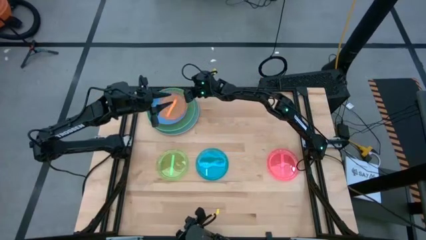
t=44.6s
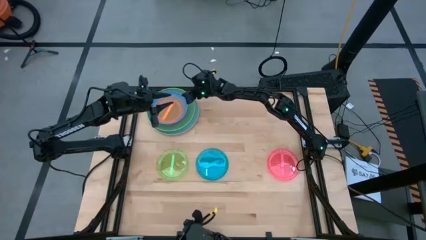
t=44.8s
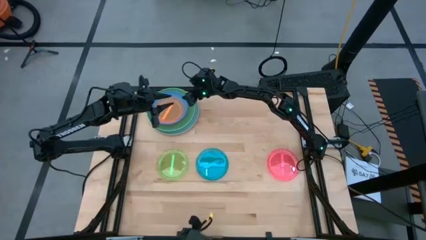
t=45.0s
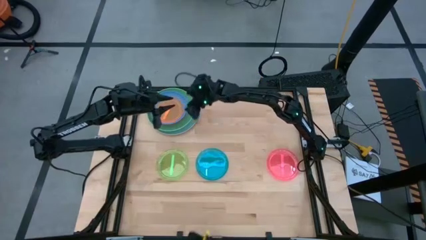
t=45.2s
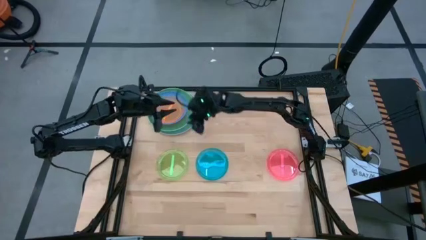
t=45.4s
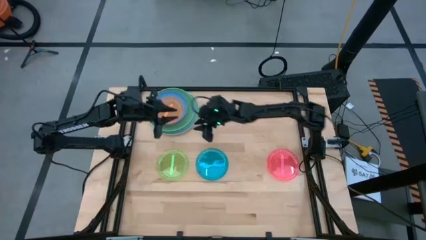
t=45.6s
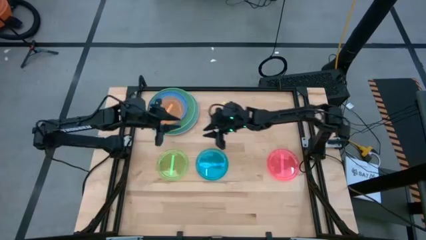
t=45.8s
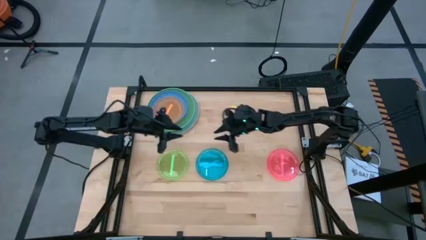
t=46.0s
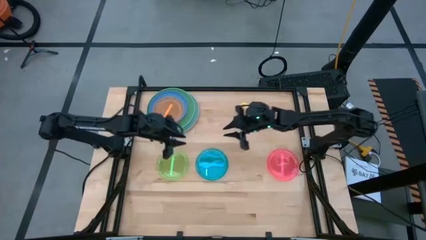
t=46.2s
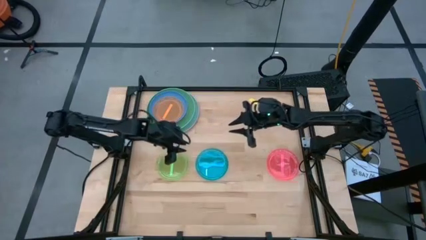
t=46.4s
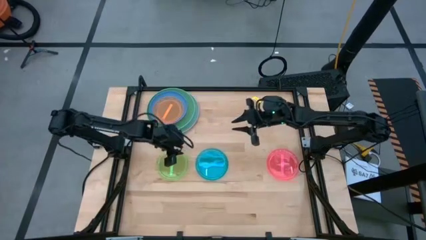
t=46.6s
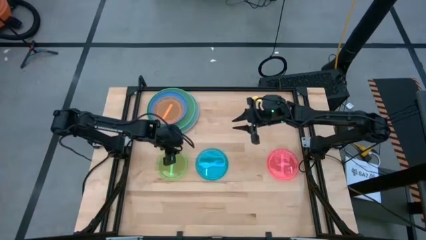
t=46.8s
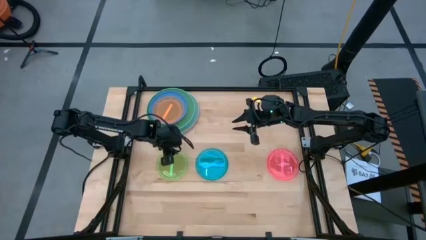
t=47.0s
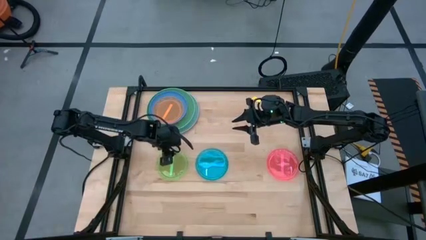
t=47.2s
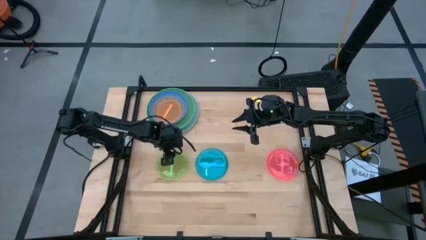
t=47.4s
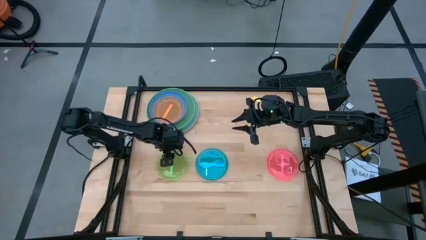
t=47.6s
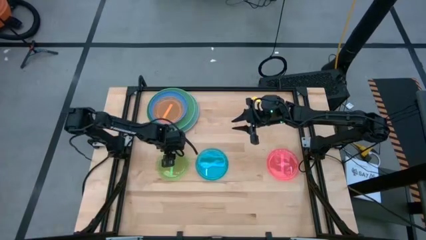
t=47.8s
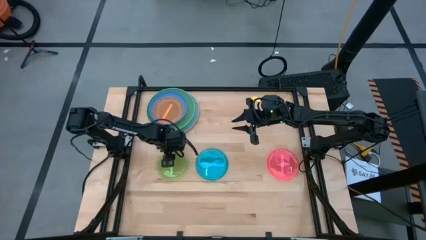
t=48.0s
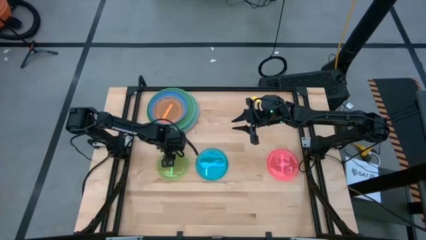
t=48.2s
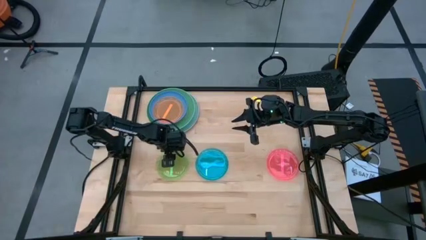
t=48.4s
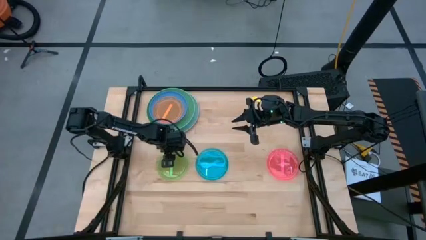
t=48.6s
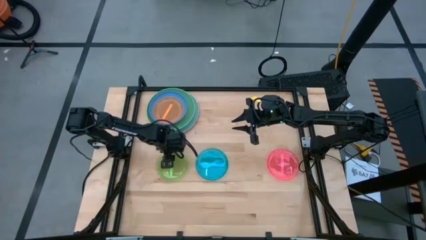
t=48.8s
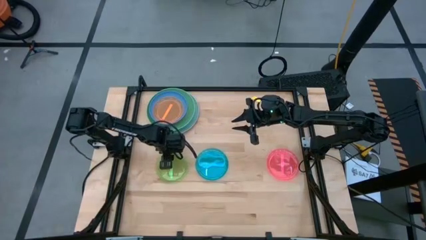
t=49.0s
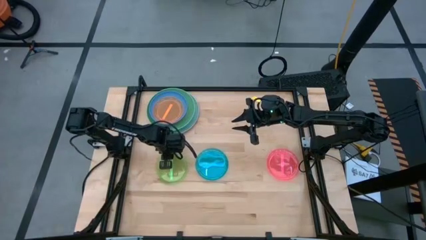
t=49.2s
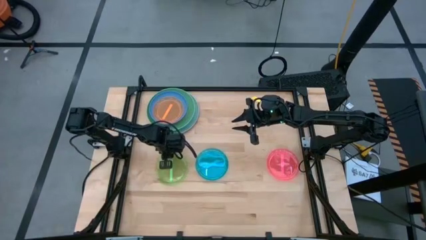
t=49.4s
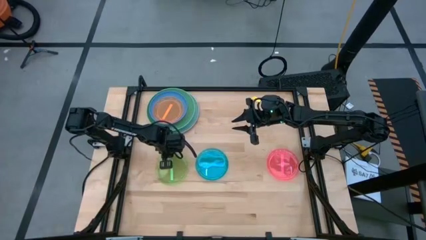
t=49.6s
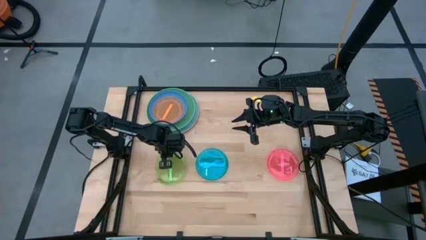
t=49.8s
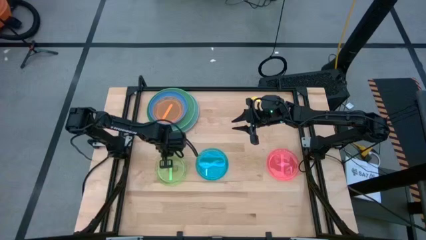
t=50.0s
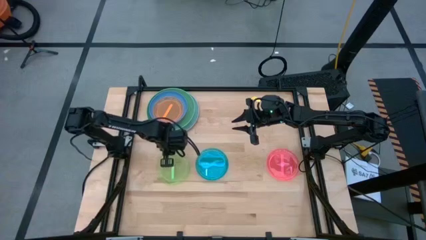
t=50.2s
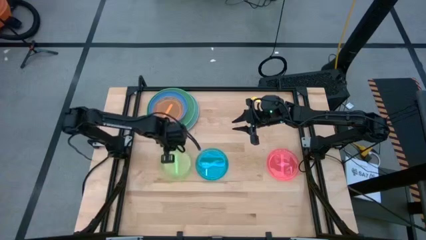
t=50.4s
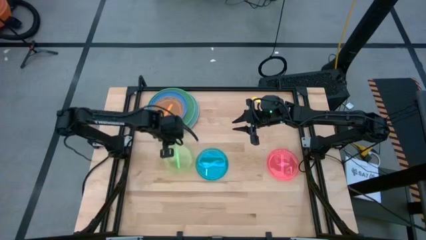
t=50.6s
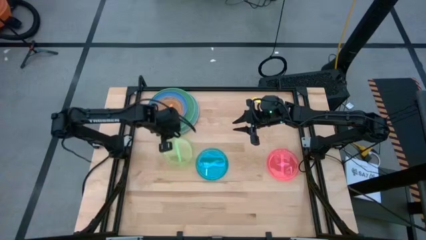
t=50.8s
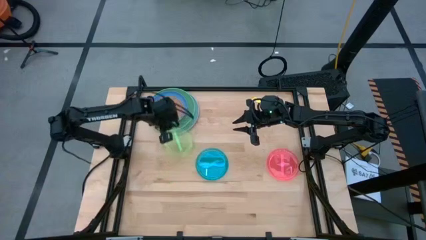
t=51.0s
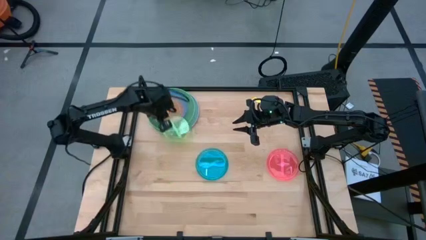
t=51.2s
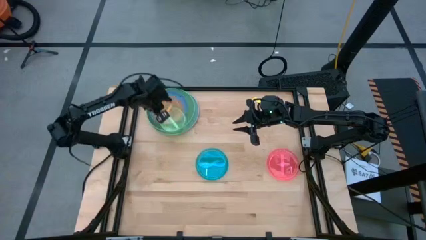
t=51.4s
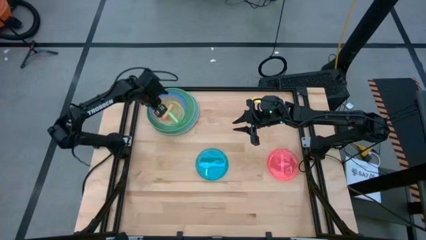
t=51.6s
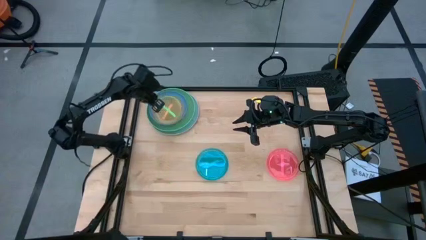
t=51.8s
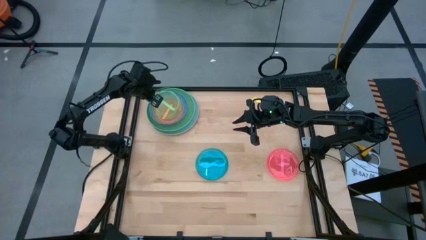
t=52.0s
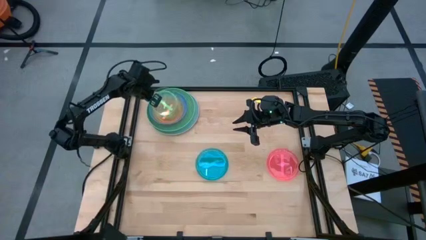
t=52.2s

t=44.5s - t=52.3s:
Task: Stack plastic plates
Stack the light green plate on top of the orange plate

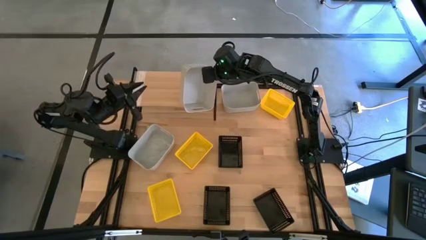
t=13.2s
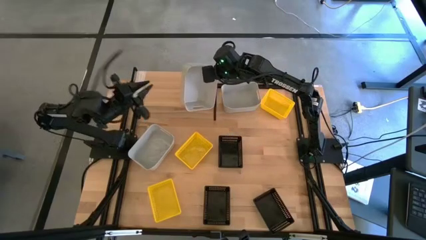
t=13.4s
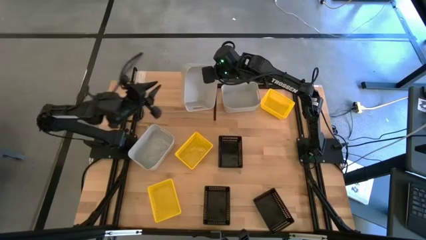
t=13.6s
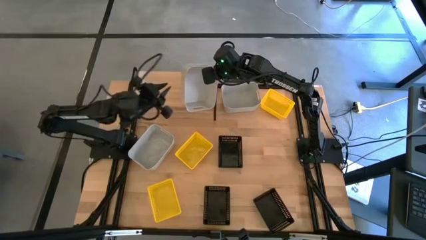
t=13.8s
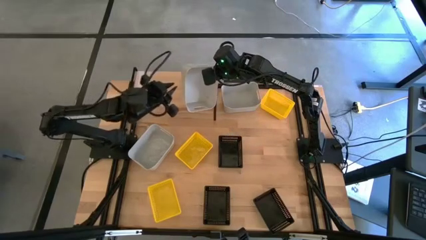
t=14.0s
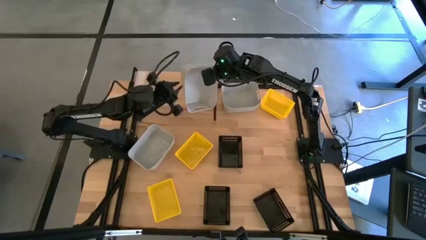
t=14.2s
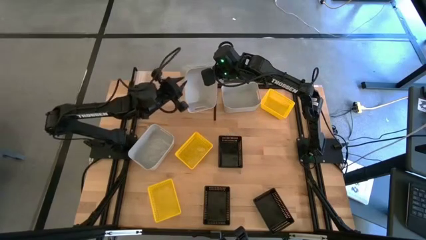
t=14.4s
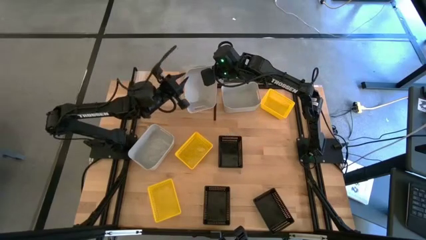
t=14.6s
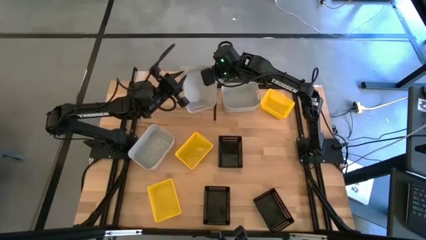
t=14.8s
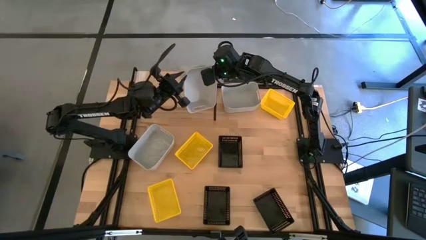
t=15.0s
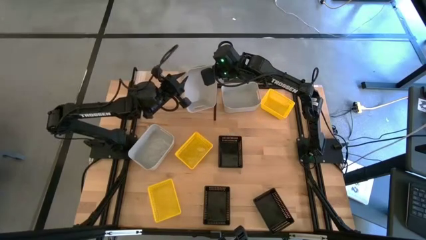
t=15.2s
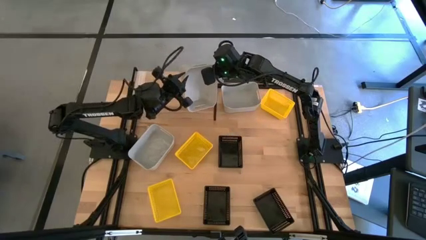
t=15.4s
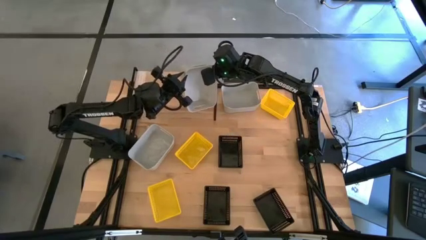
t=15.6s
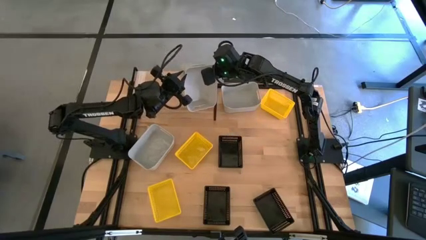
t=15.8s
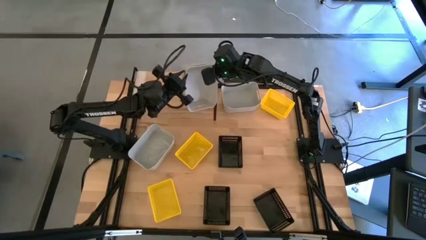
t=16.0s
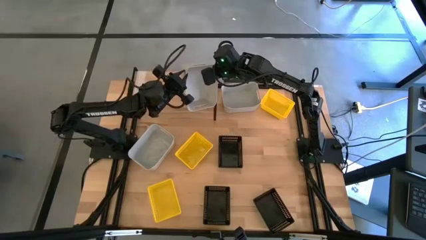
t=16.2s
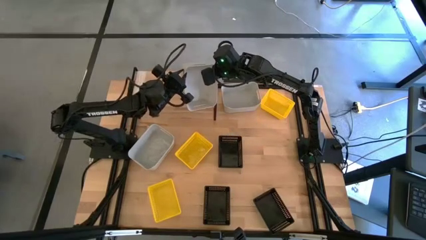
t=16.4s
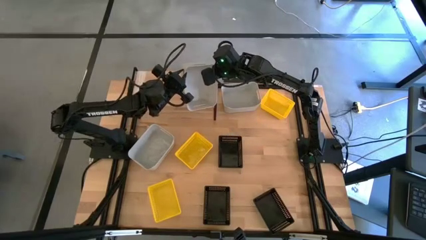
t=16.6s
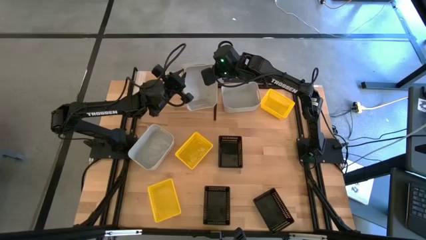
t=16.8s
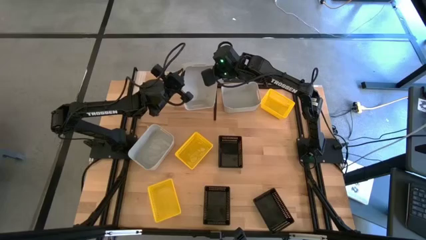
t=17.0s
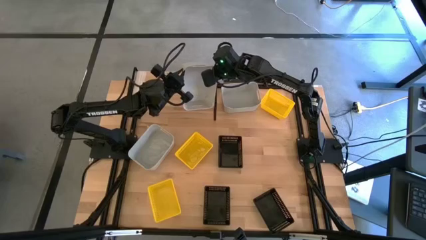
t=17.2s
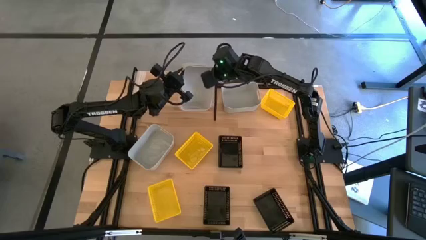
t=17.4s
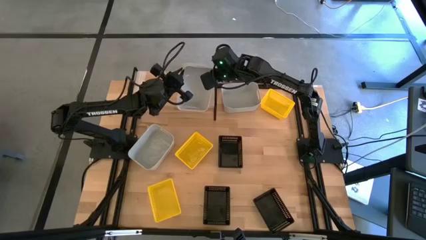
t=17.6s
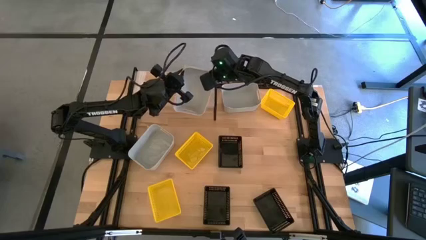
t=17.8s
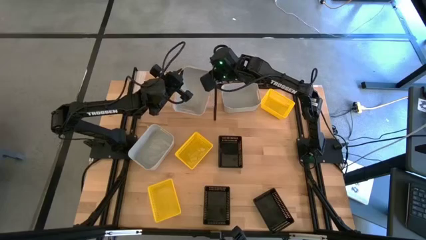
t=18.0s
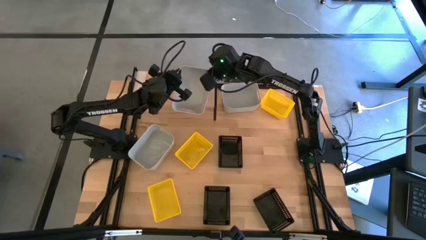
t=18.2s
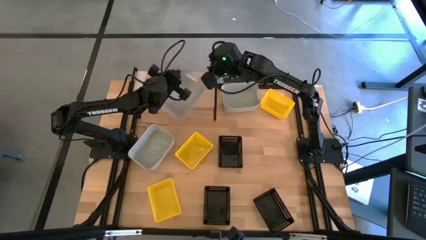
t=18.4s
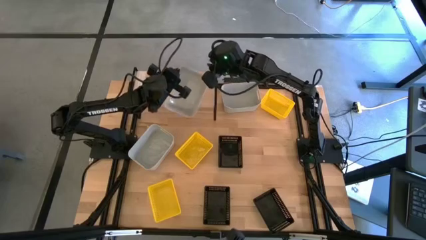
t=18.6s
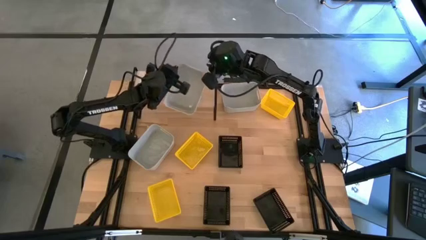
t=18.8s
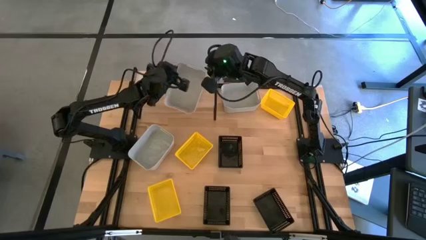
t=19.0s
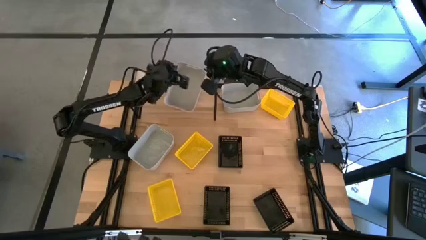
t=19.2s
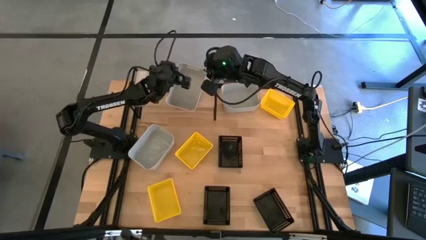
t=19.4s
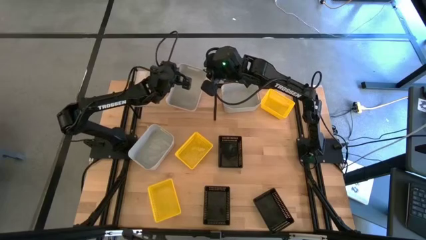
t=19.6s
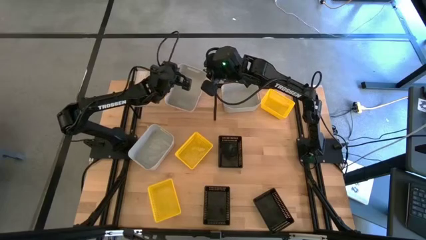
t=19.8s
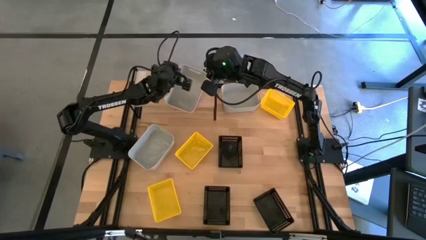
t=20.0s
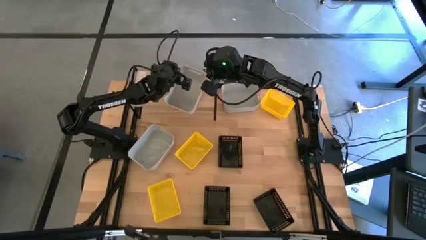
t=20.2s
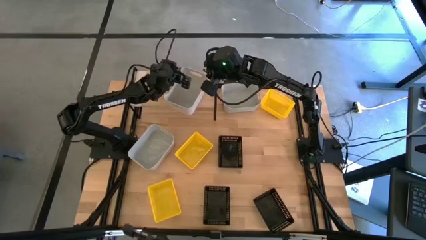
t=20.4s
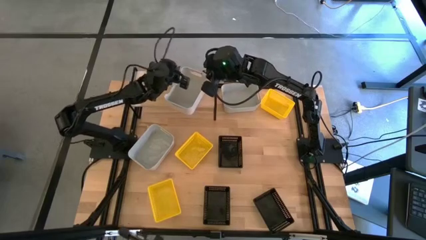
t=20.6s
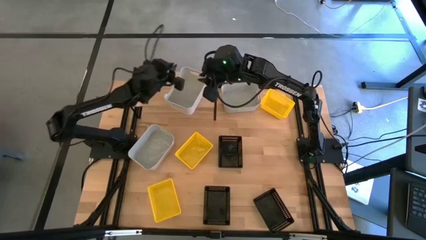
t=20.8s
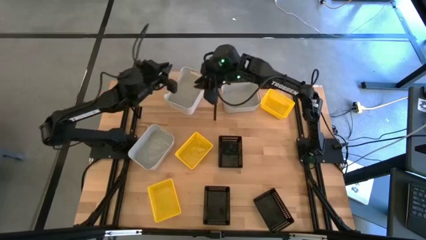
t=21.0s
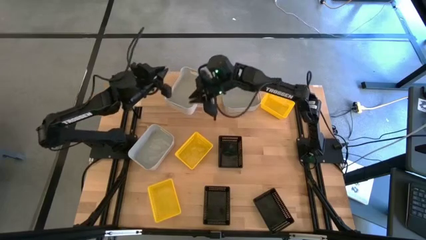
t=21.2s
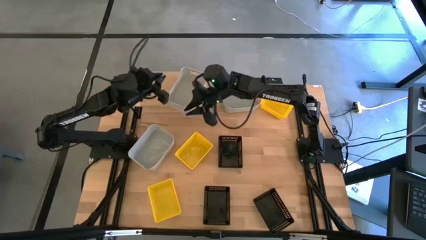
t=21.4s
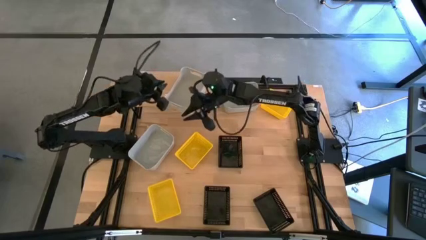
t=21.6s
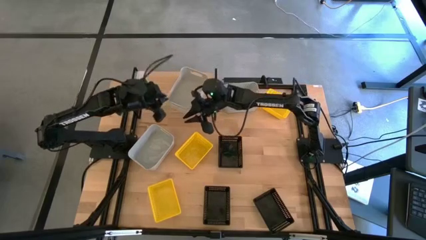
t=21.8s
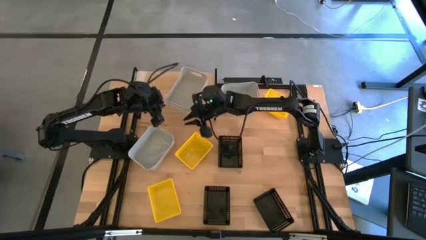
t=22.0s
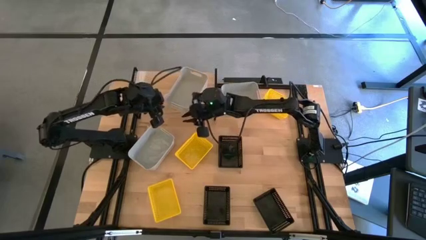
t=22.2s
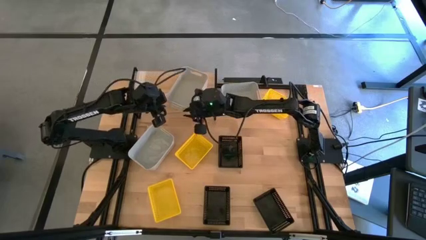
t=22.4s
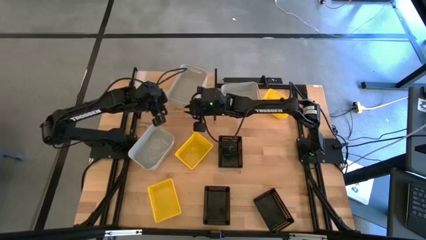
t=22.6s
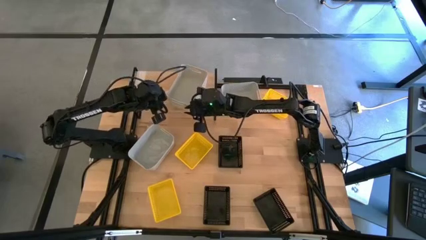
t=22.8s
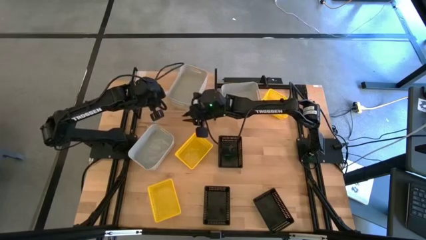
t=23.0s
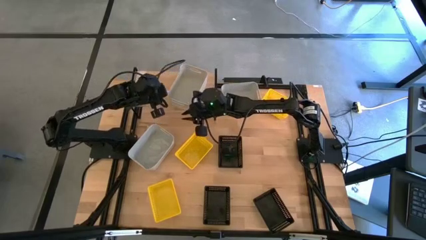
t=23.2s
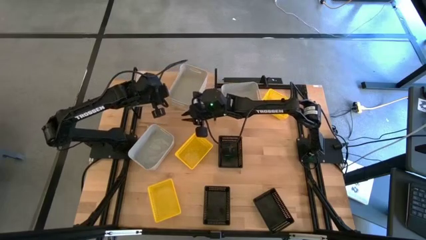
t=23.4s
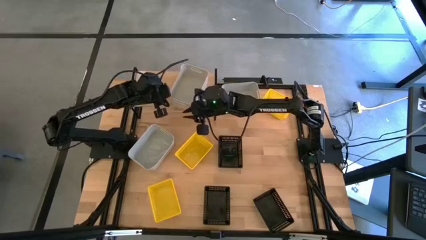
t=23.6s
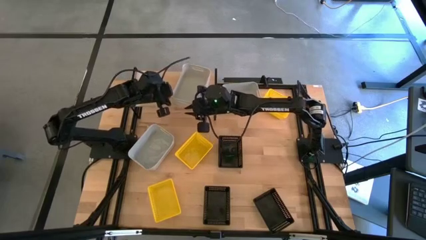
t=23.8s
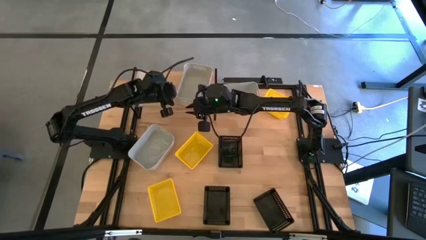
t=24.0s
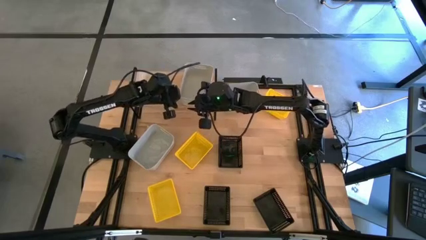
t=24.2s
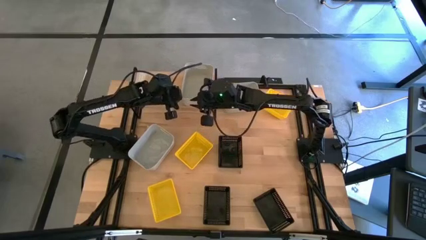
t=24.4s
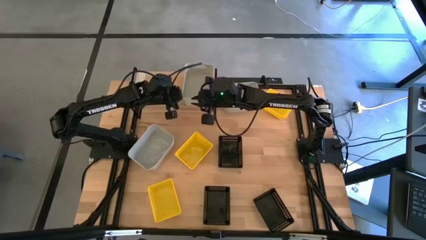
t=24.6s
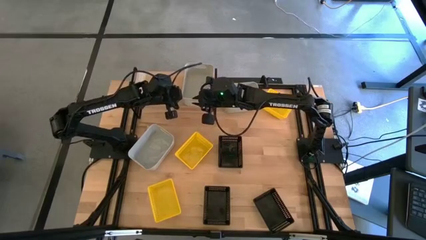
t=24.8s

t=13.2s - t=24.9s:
Task: Stack baskets on shelf by color
Put the bottom right gray bin on the shelf
